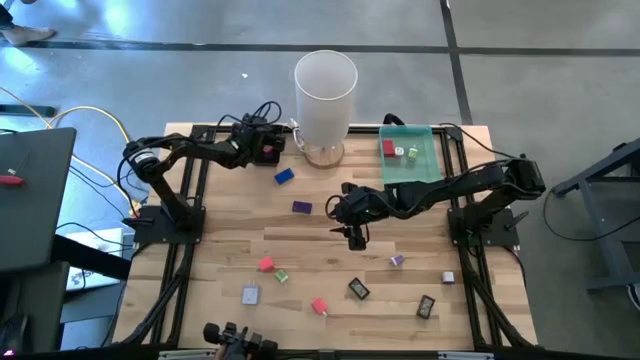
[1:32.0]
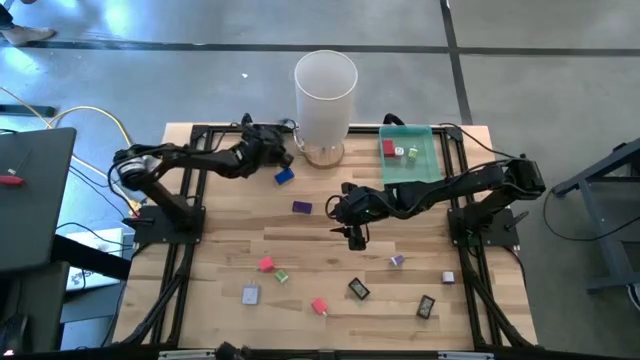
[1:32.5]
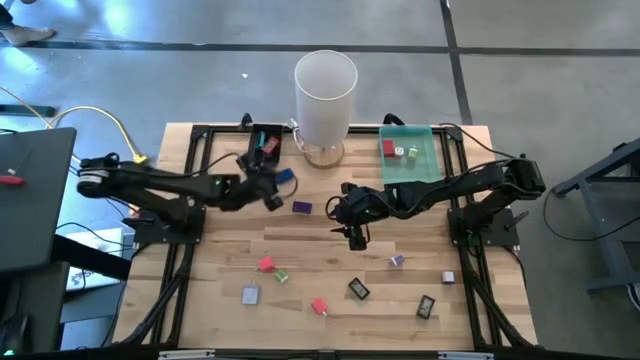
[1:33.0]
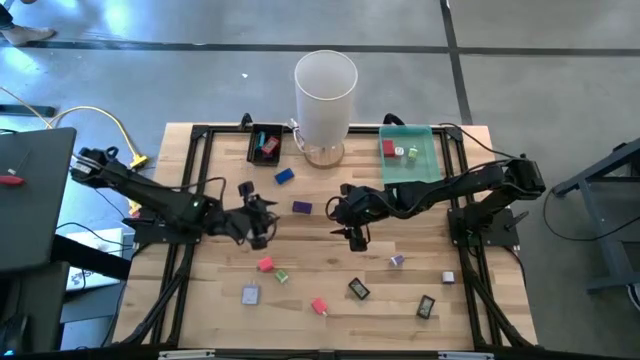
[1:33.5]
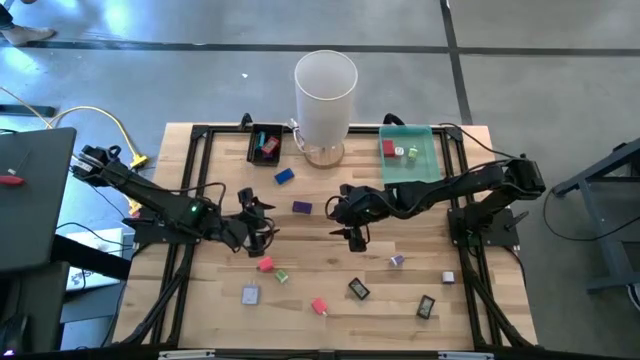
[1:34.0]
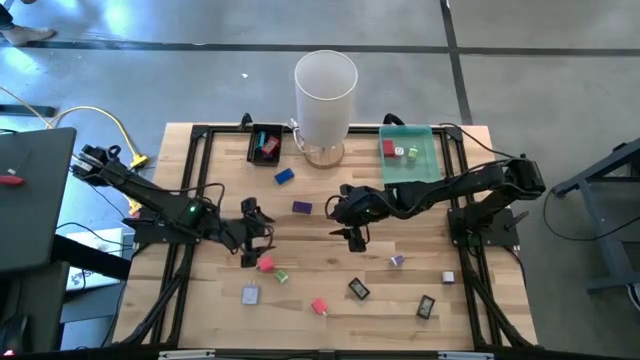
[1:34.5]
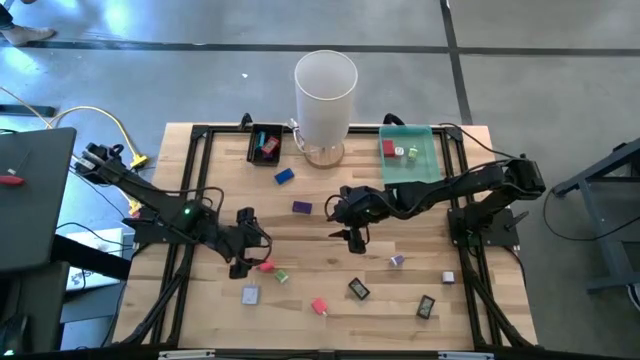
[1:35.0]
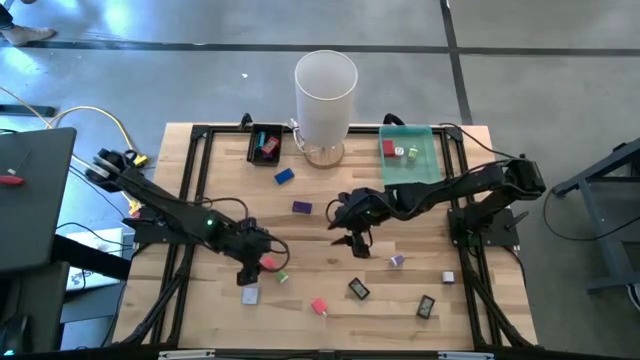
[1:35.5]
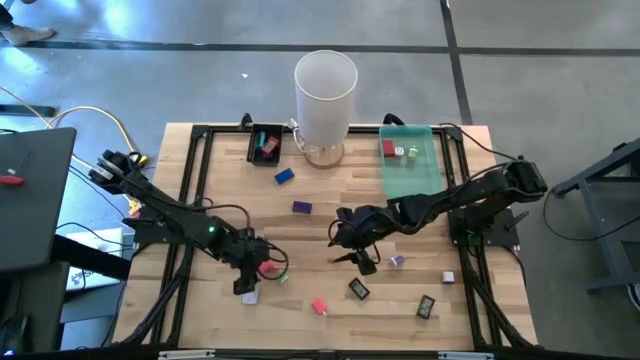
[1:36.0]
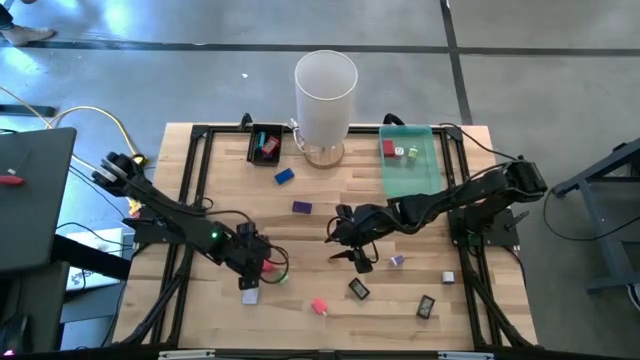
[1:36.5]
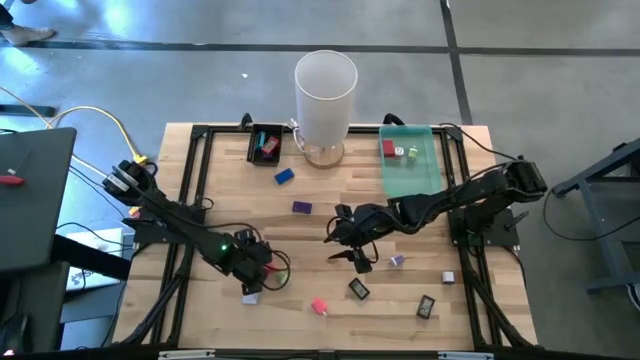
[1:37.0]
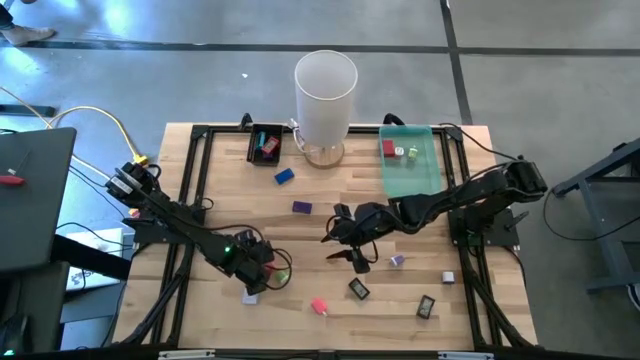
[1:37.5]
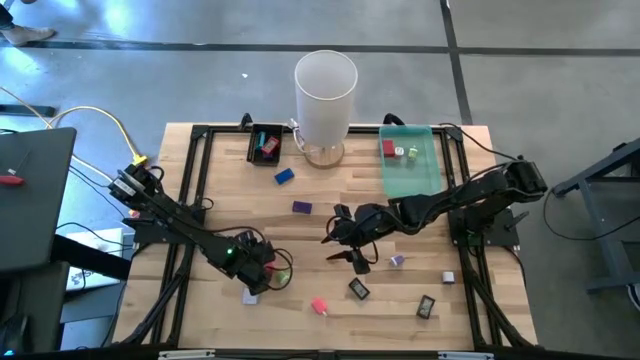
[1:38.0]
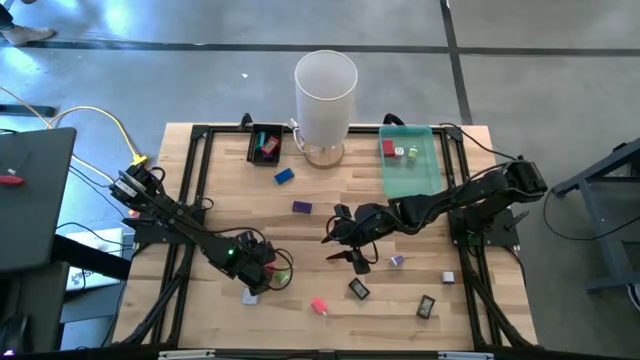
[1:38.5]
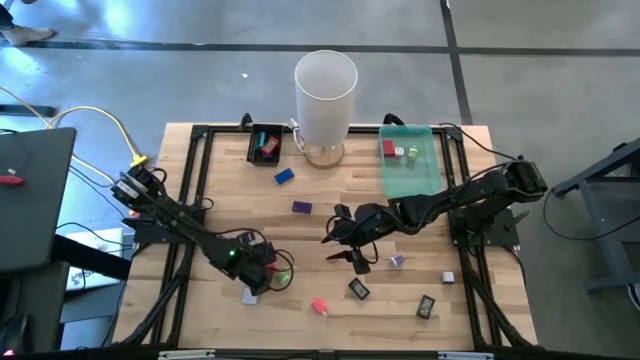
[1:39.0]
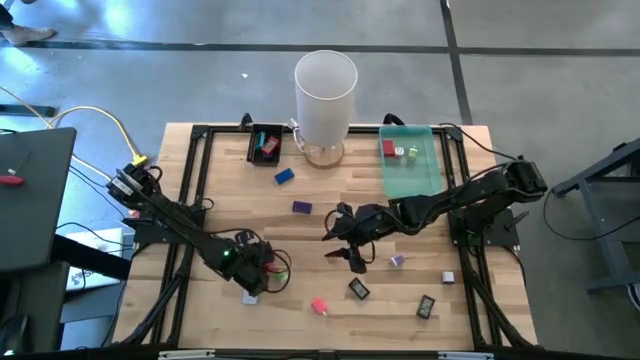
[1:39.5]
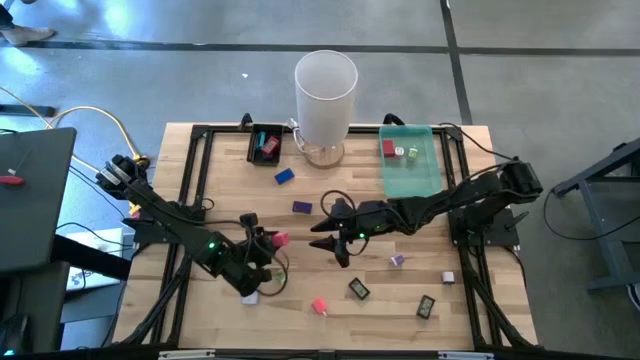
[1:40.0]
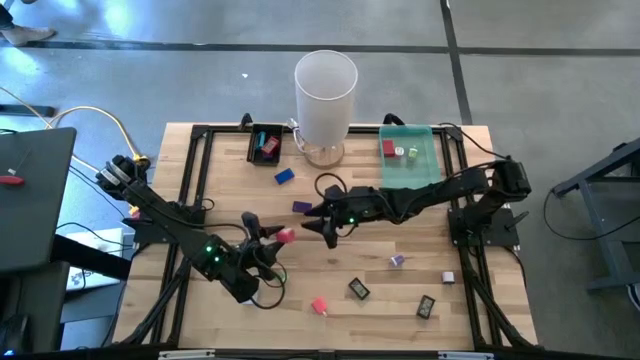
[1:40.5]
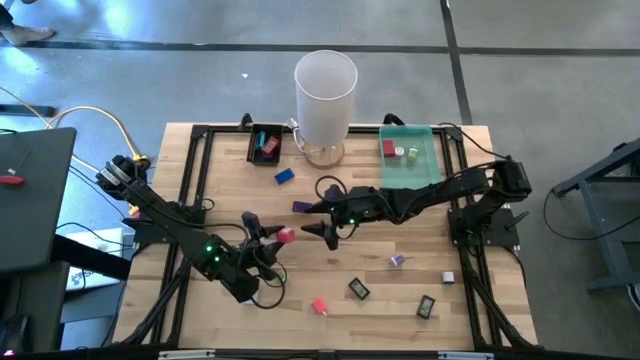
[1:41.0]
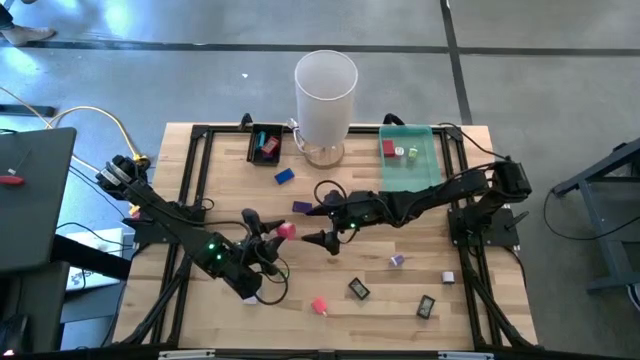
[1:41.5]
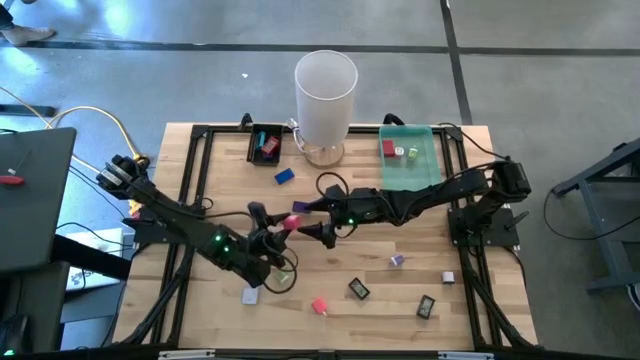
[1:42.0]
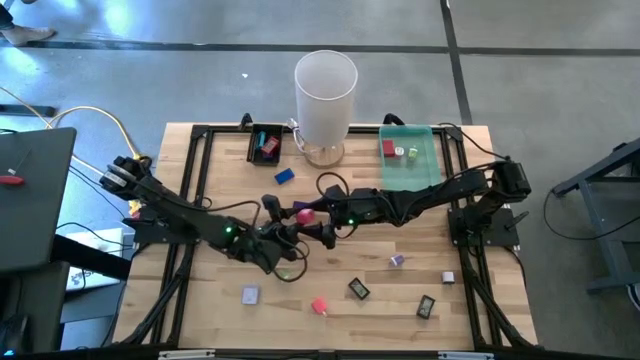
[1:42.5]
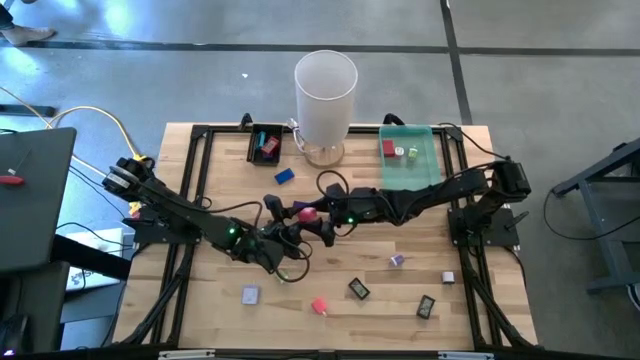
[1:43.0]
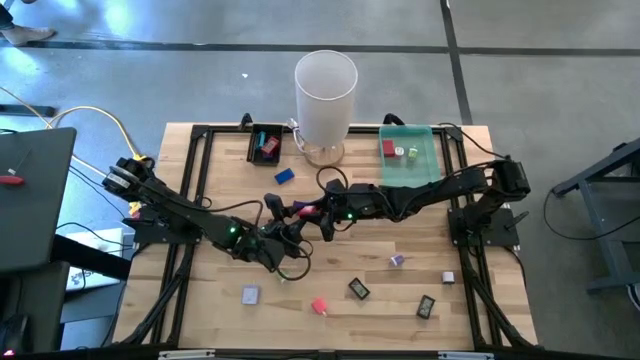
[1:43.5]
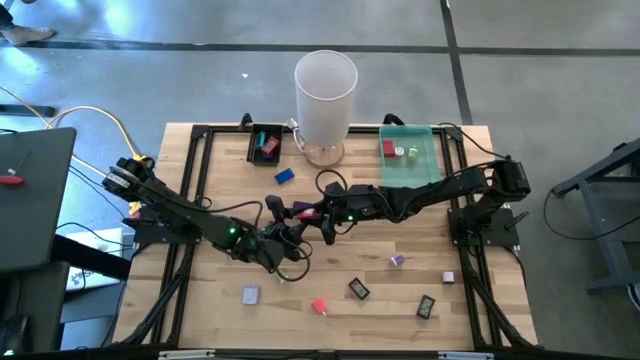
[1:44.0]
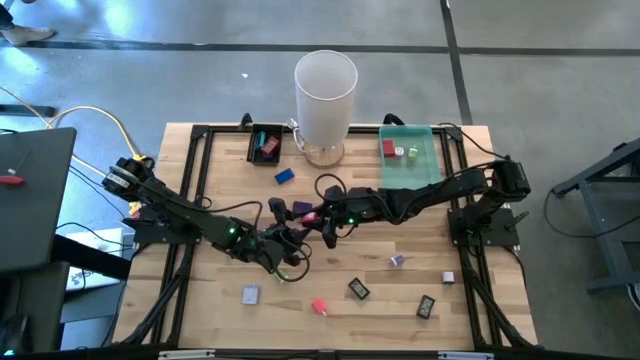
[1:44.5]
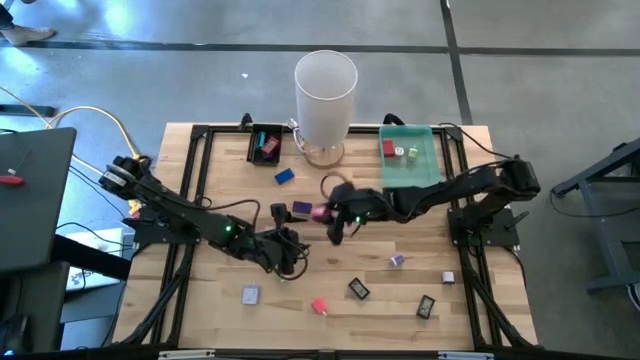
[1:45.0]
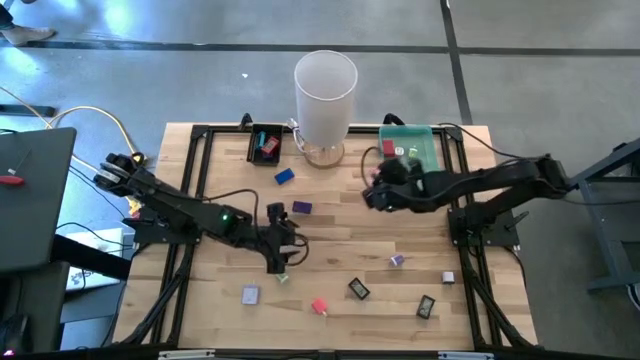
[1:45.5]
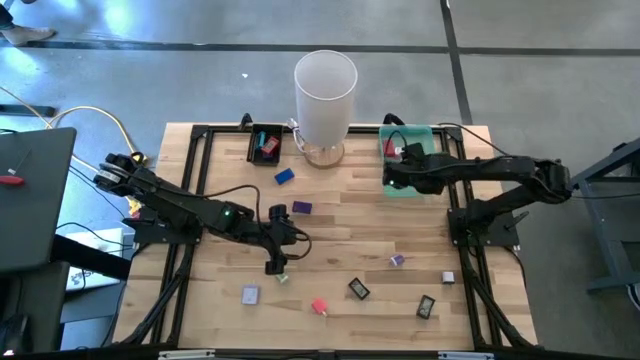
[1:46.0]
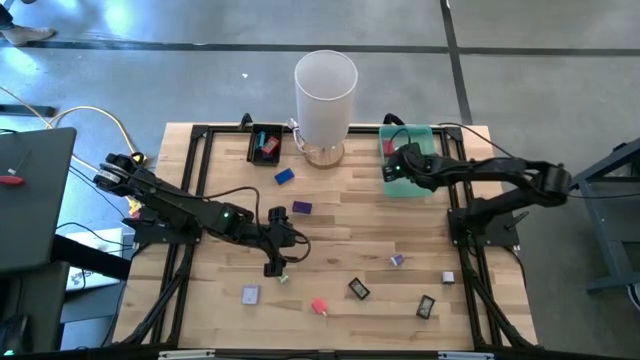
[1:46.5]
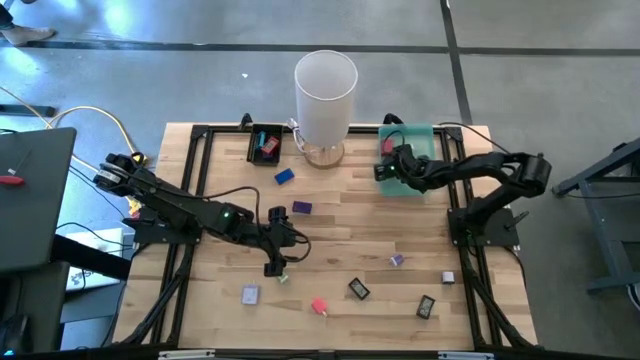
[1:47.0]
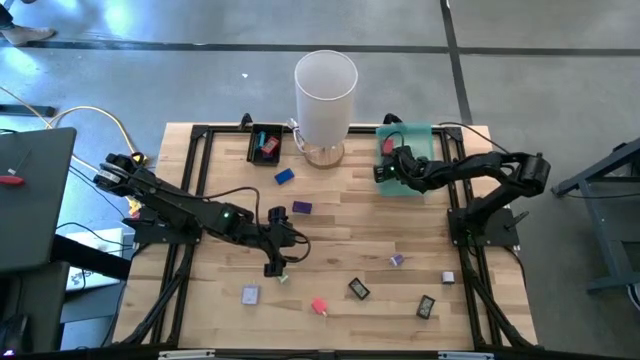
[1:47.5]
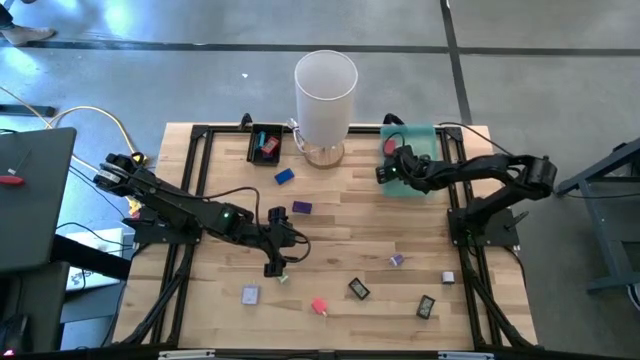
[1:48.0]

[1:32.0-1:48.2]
Task: Pick & Place Office items
Put the top pink adapter into the green bin
